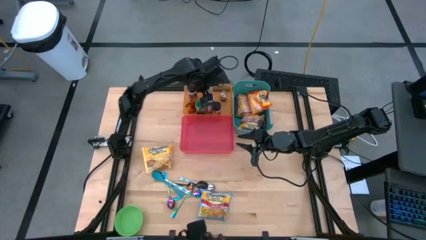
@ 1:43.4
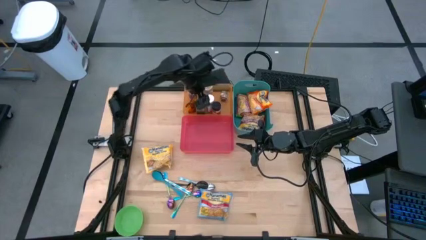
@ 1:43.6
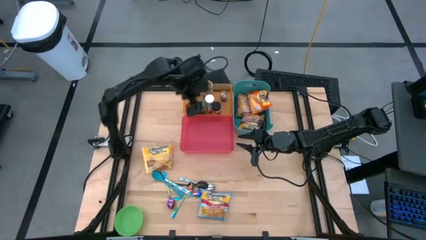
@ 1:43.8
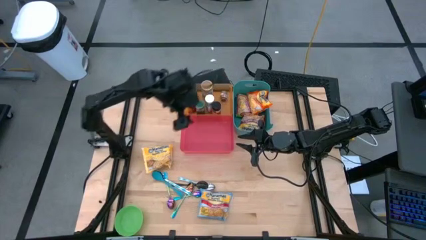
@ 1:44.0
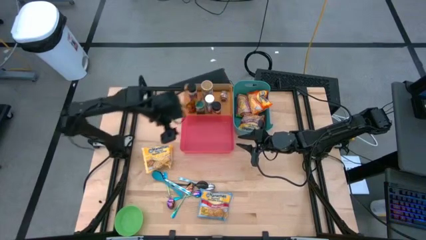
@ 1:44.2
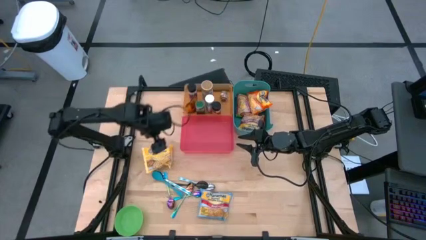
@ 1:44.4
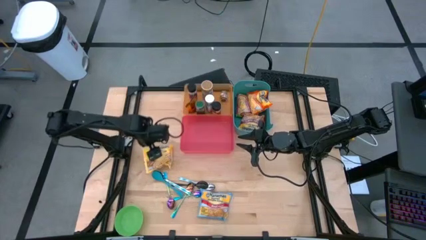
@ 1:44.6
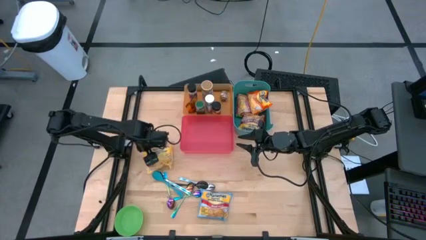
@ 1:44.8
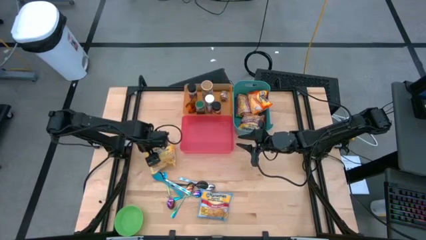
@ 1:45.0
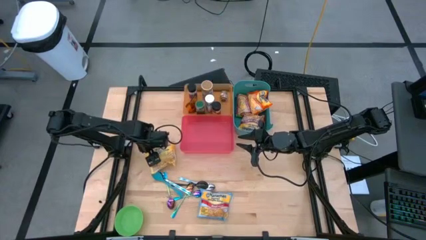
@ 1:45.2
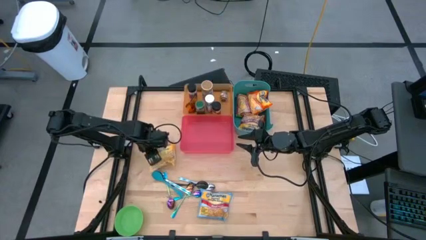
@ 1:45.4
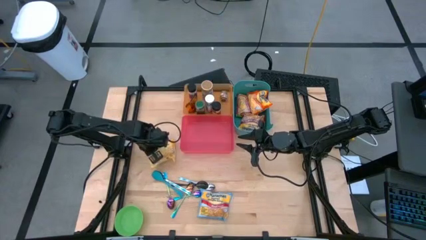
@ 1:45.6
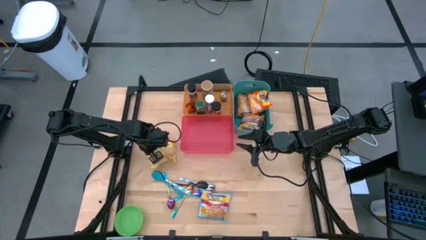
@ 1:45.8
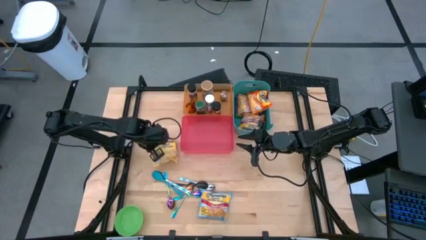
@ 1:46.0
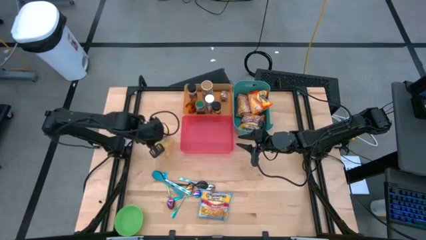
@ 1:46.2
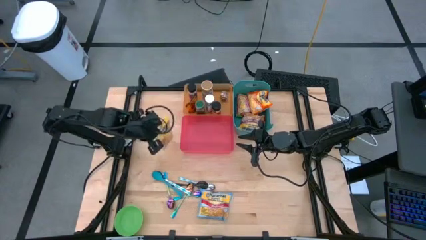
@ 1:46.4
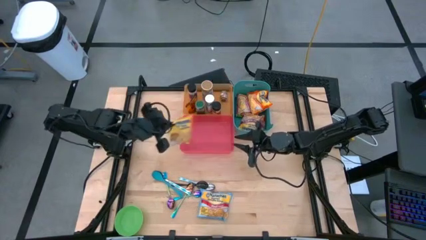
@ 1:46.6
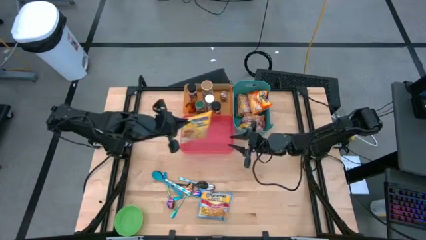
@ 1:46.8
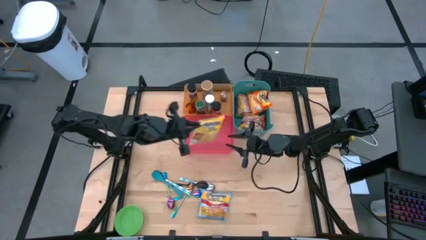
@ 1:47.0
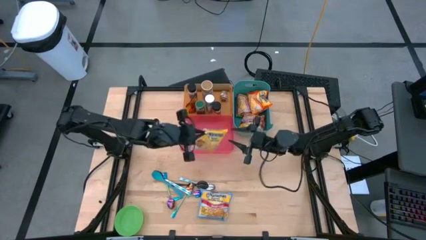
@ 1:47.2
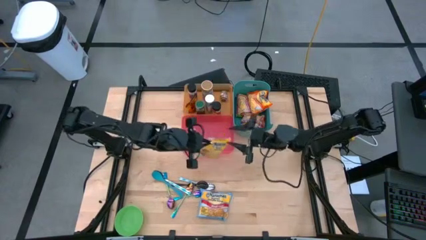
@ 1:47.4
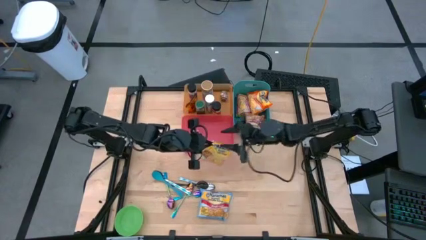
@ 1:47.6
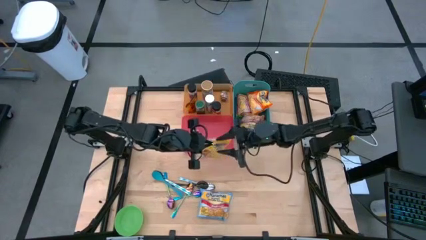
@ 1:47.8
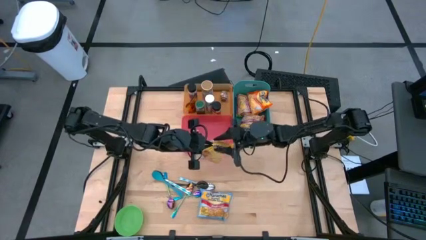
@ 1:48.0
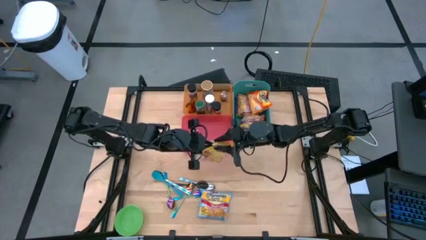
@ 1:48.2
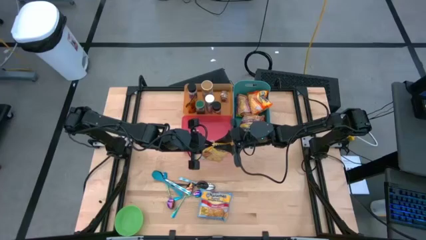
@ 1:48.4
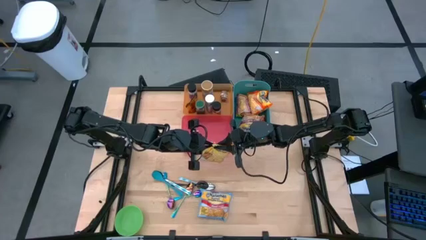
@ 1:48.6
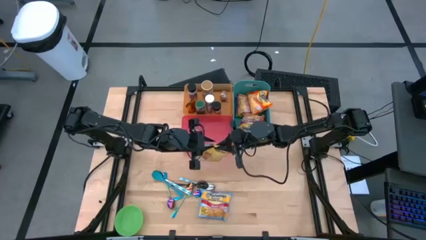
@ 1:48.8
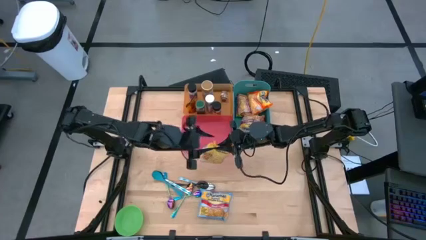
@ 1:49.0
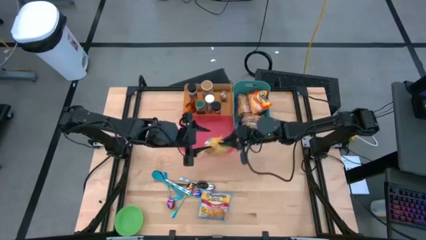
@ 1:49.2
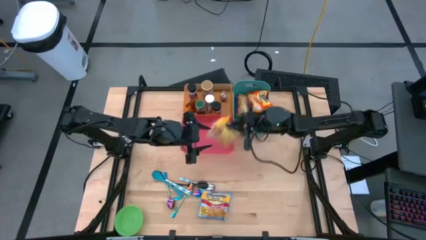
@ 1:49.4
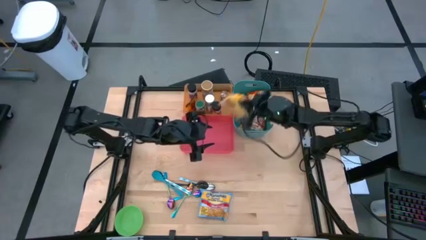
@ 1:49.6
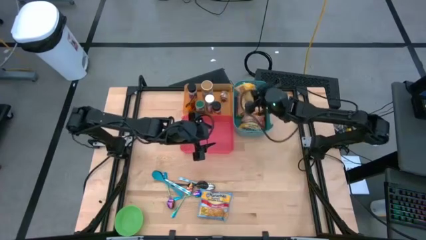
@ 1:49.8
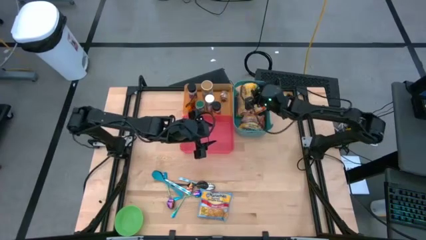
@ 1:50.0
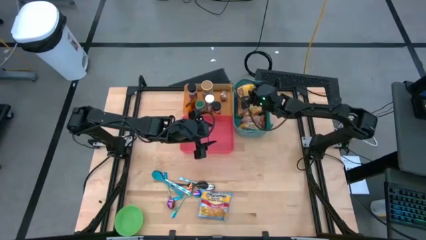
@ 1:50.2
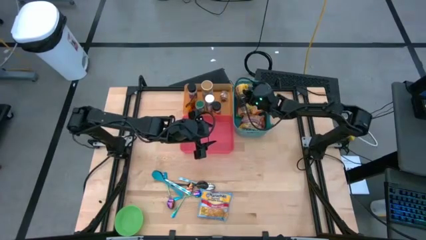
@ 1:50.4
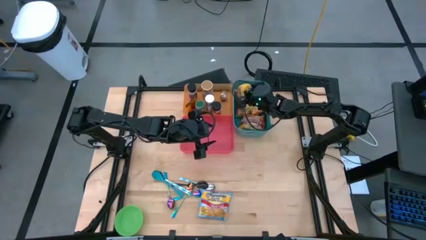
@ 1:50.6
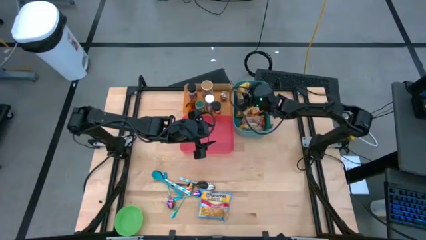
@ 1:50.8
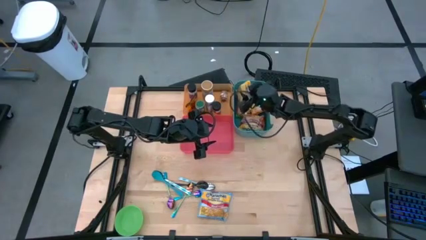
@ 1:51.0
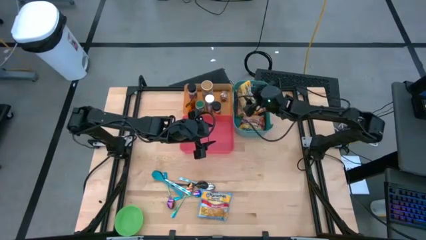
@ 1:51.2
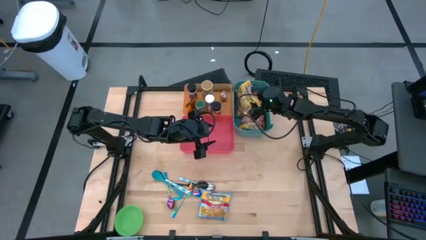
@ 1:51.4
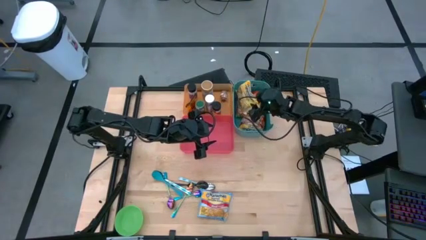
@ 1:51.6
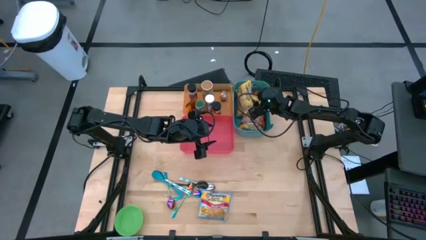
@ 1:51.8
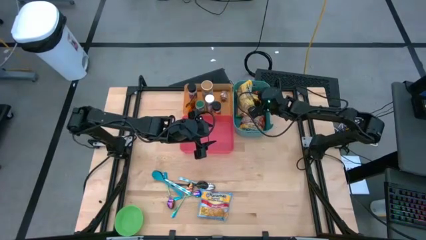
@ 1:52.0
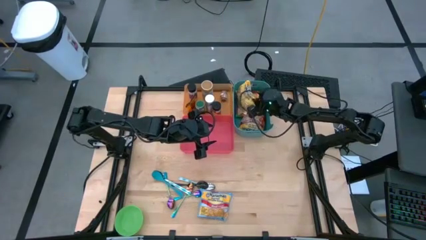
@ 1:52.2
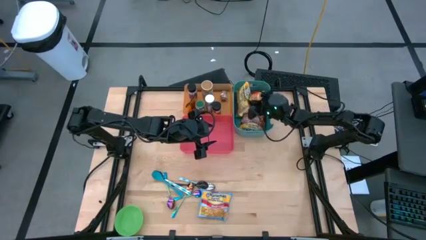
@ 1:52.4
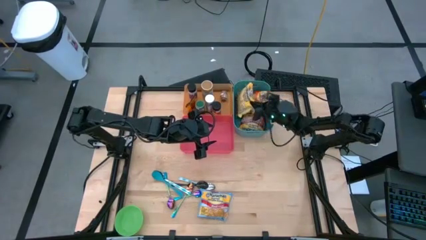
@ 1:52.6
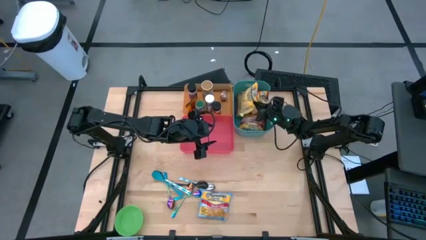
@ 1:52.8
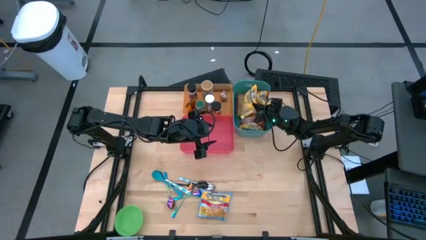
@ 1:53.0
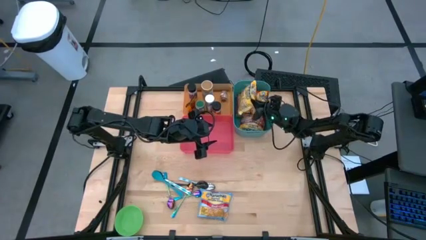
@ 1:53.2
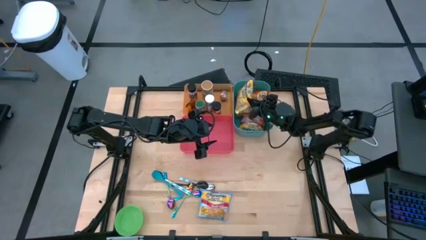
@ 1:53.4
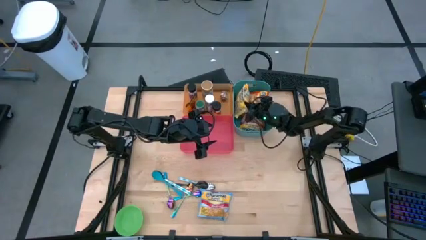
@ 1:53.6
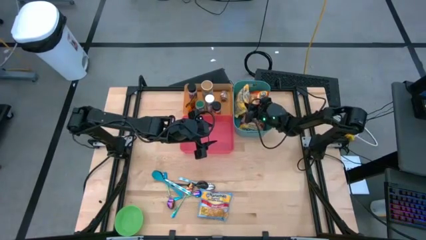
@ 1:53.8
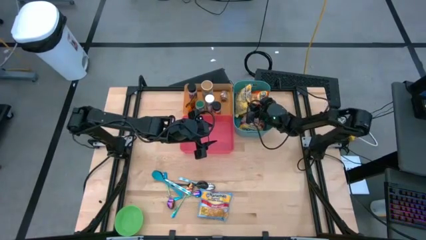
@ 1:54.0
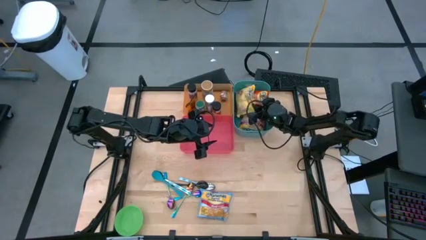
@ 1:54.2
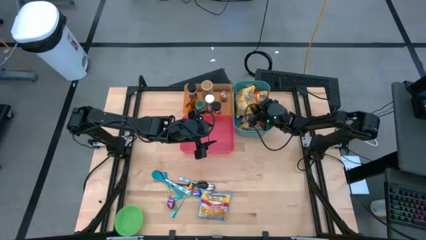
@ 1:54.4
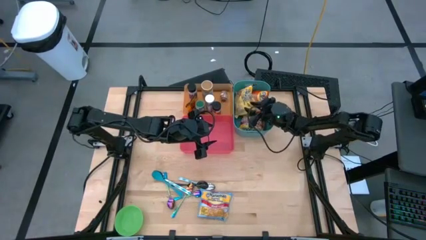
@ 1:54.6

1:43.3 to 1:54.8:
Task: Pick & Place Food Item
Put the yellow noodle pack into the blue bin

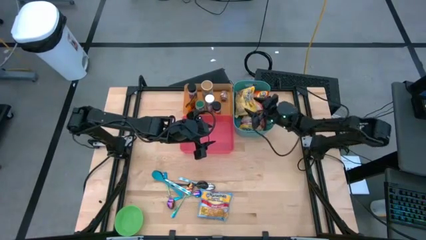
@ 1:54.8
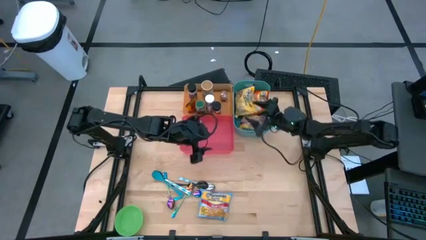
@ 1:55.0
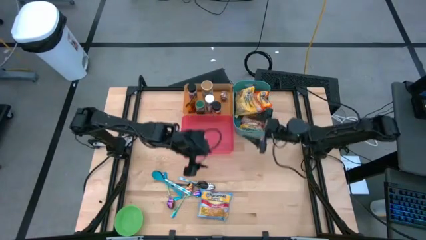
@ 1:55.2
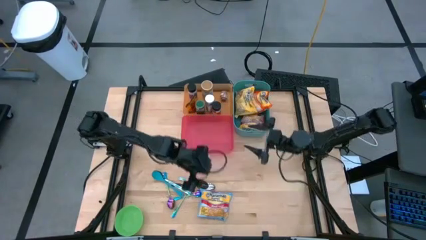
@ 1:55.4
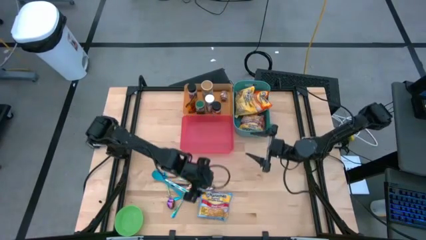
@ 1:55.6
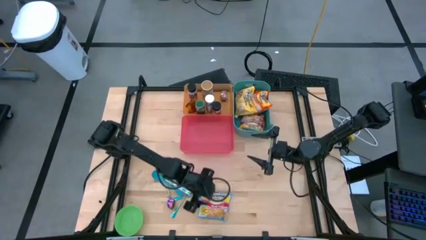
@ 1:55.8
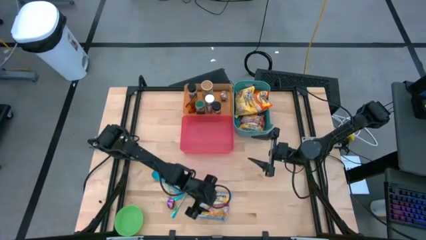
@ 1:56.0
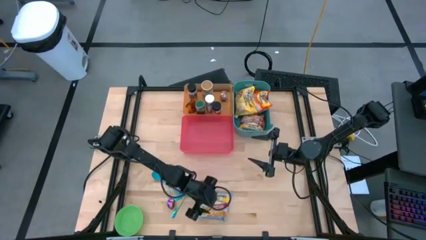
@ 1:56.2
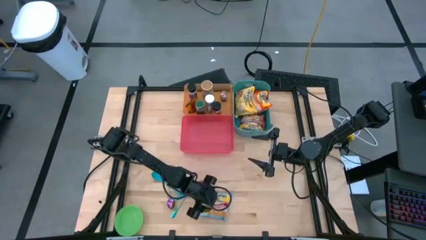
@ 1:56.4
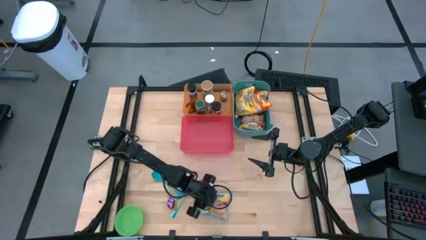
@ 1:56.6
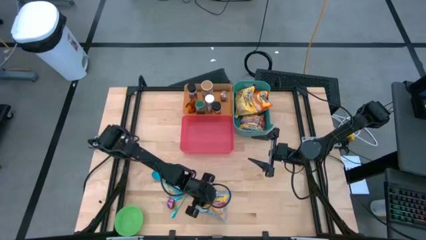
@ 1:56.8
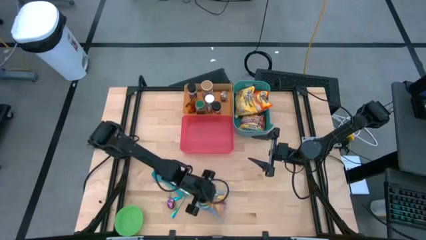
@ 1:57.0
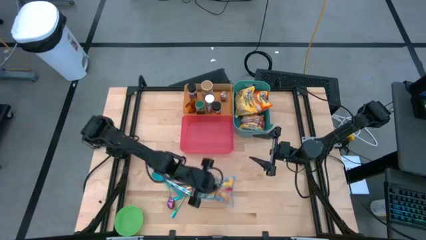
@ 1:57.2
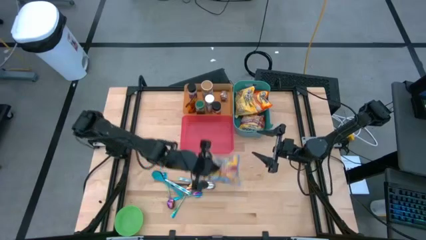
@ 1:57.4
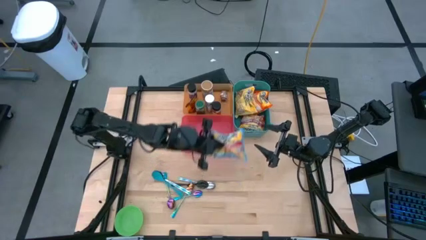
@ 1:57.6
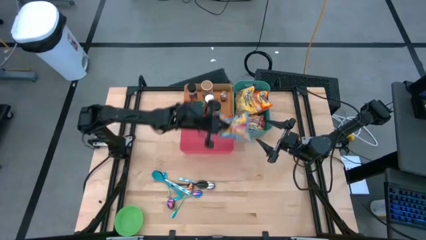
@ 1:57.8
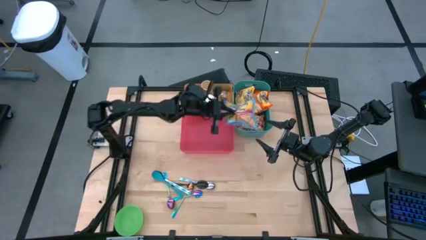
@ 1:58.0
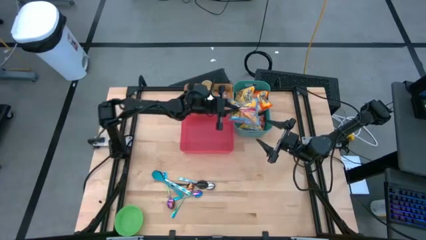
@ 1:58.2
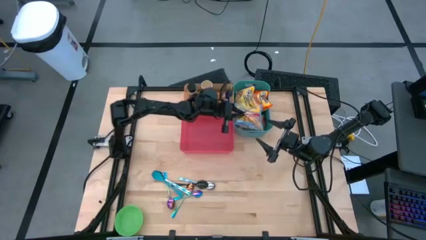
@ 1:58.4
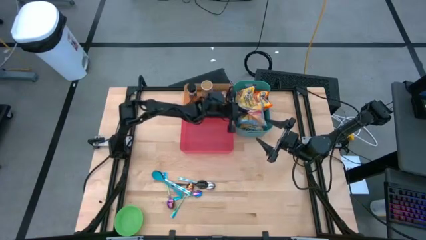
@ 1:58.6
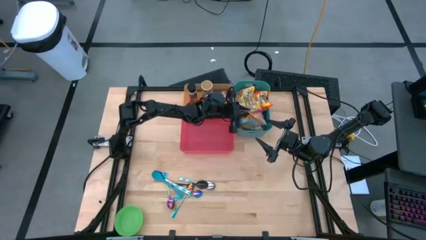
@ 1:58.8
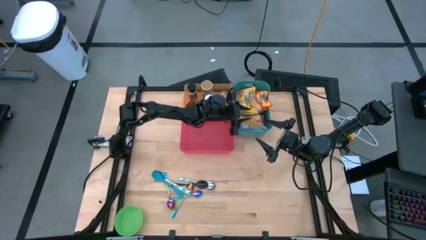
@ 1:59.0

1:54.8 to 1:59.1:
Put the blue noodle pack into the blue bin

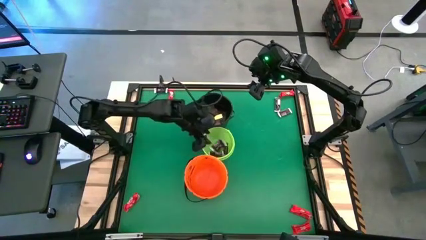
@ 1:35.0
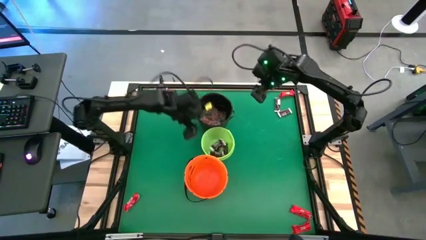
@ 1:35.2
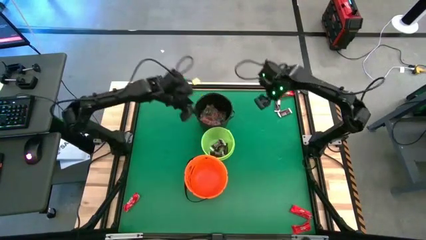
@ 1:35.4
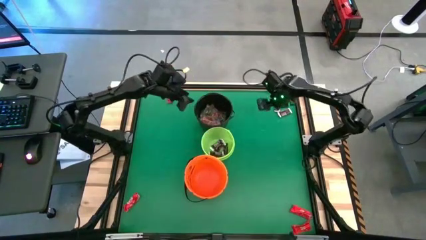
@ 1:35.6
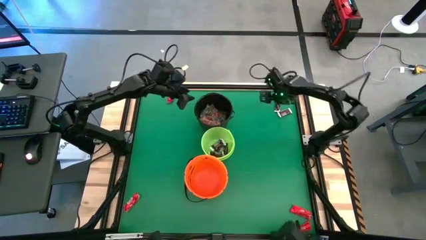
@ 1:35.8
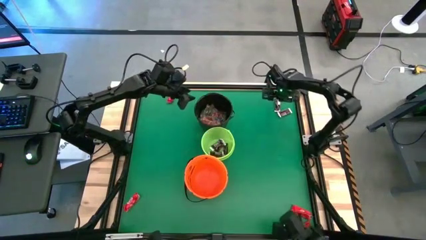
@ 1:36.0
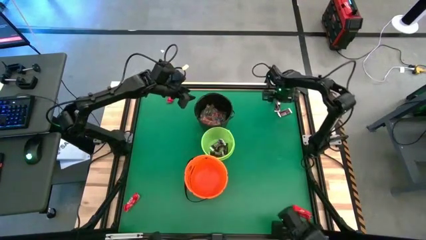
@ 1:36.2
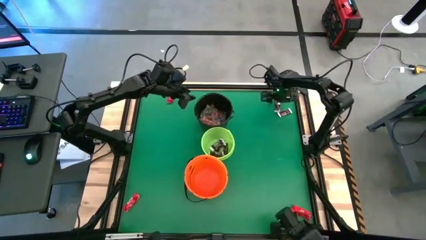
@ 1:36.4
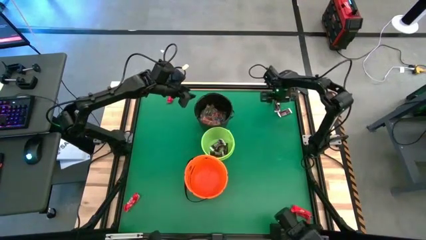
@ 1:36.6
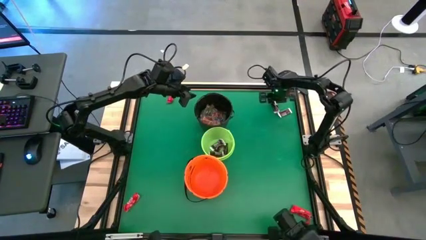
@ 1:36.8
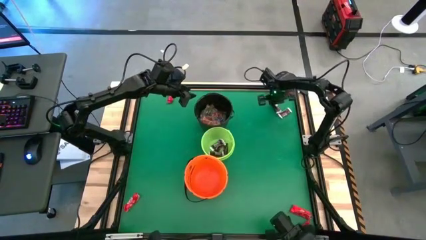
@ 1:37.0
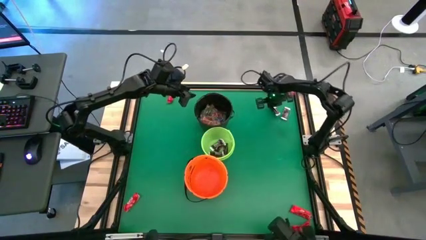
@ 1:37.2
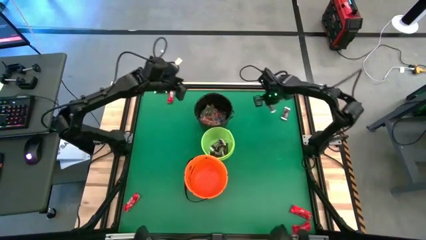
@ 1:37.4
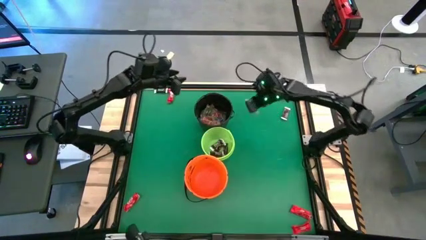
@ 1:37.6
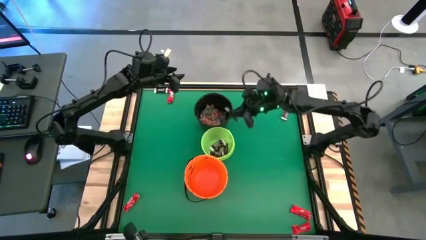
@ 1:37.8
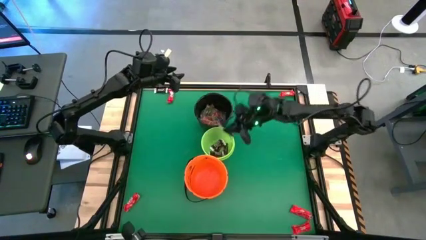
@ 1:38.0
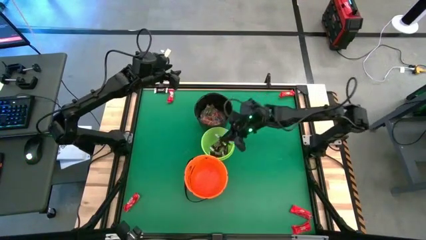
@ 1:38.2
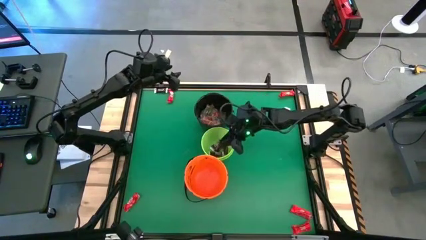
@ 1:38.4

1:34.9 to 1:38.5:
Task: Sort candy by brand, put in halloween buckets
Put the brown chocolate bar into the green bucket
